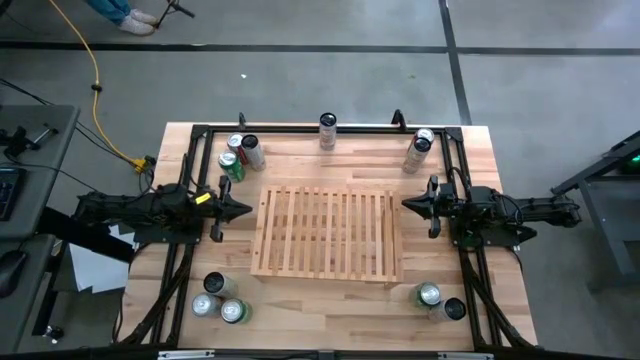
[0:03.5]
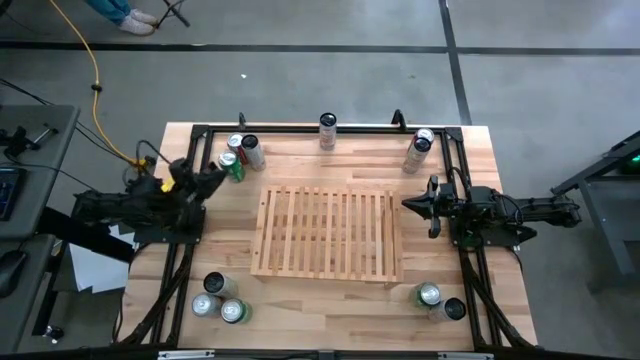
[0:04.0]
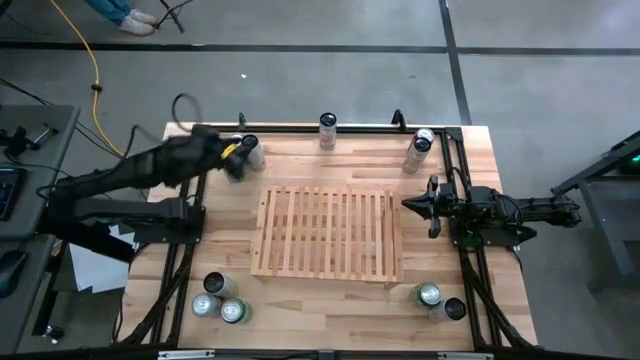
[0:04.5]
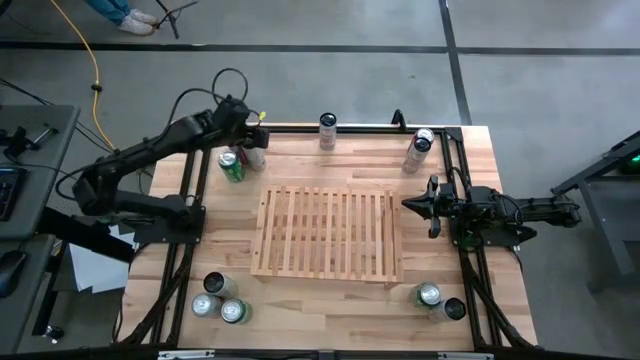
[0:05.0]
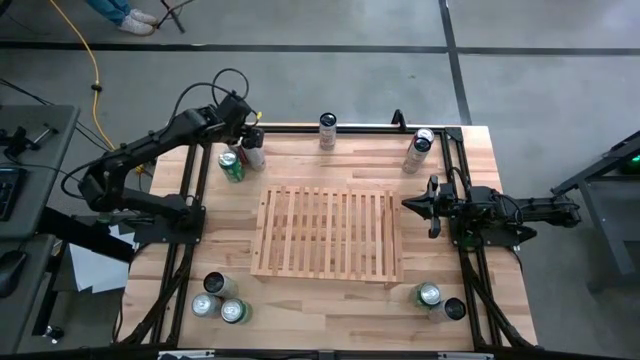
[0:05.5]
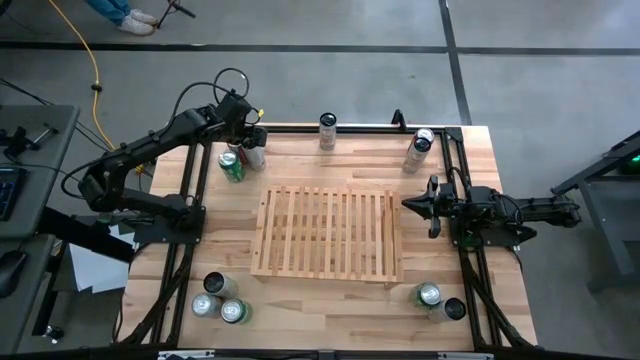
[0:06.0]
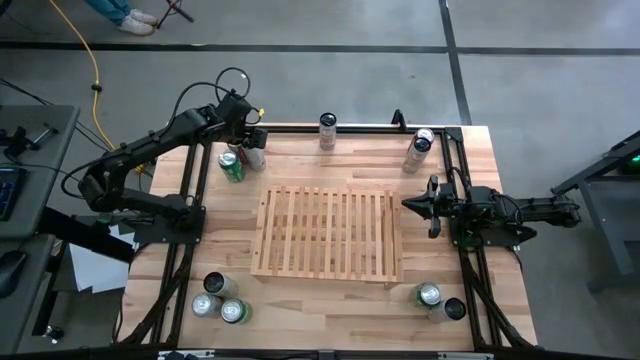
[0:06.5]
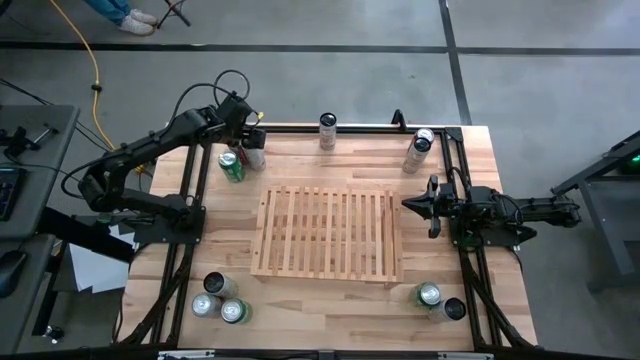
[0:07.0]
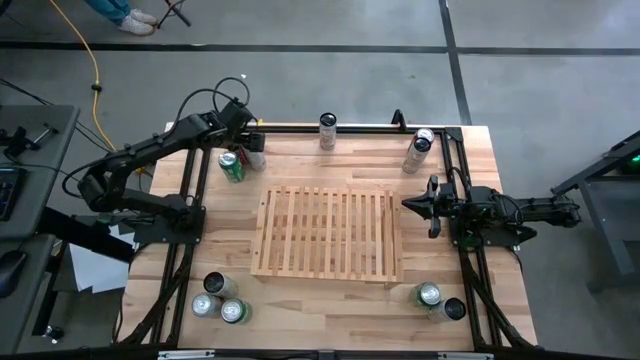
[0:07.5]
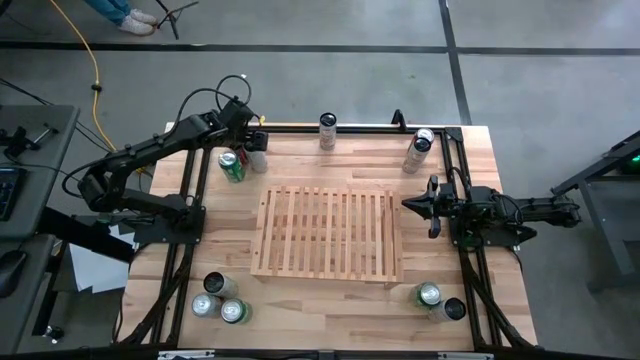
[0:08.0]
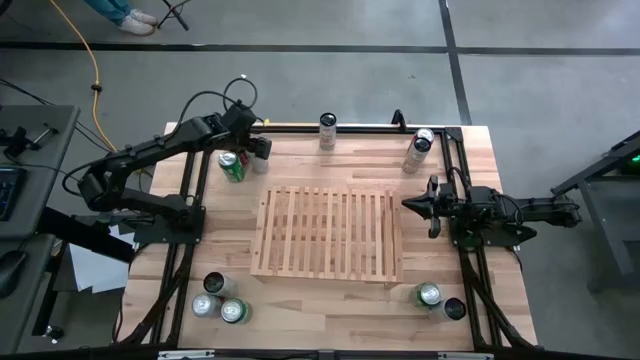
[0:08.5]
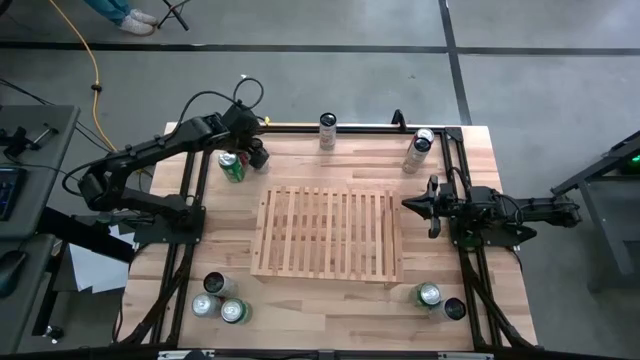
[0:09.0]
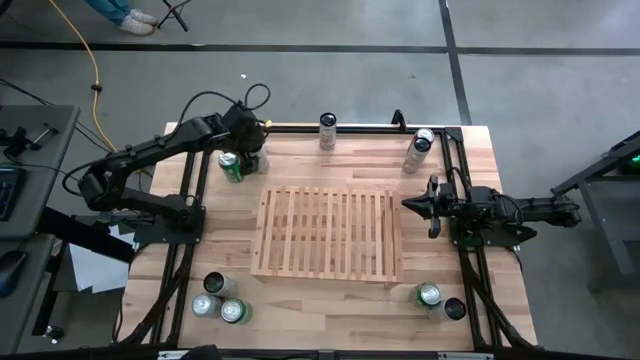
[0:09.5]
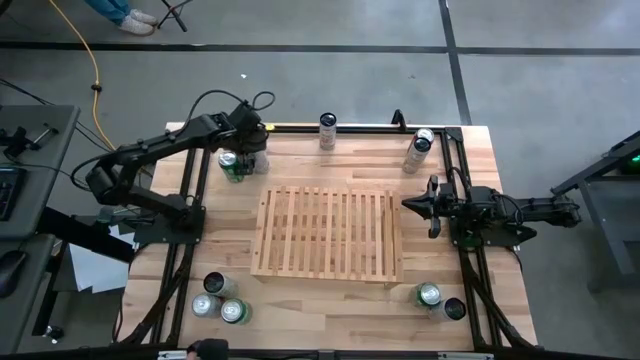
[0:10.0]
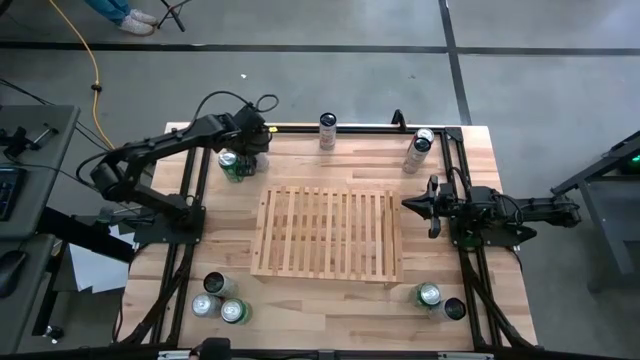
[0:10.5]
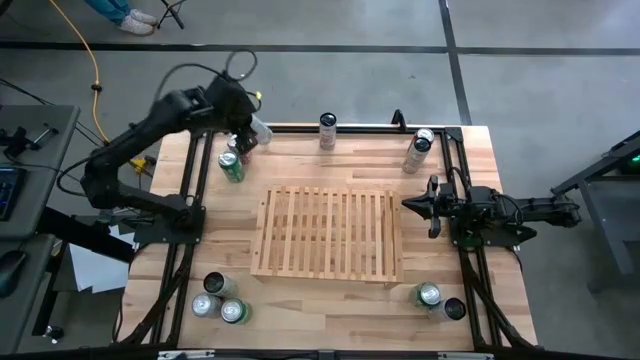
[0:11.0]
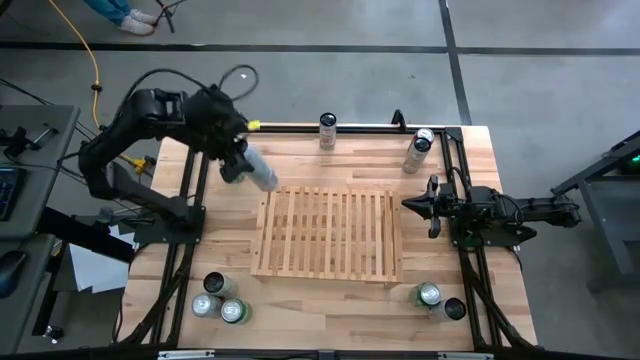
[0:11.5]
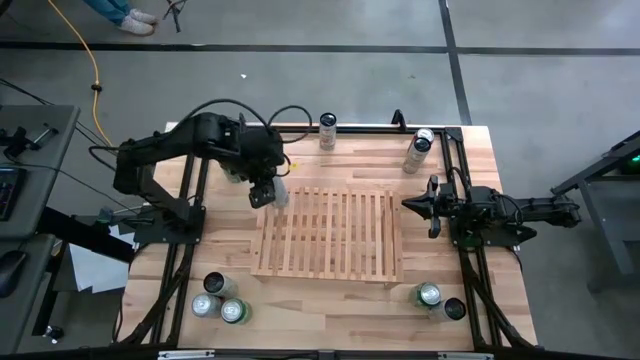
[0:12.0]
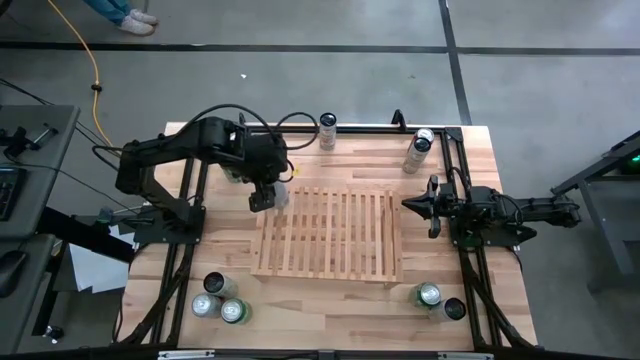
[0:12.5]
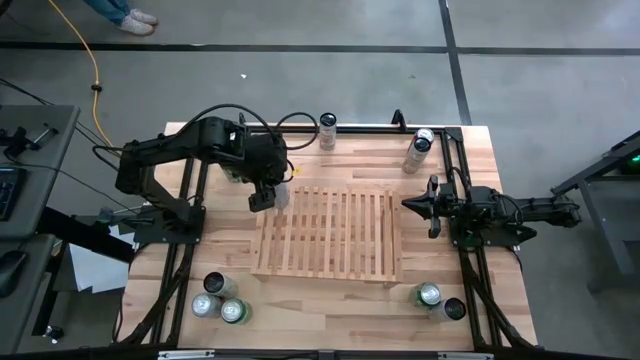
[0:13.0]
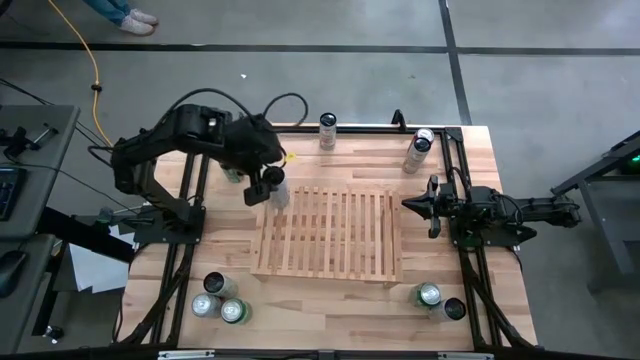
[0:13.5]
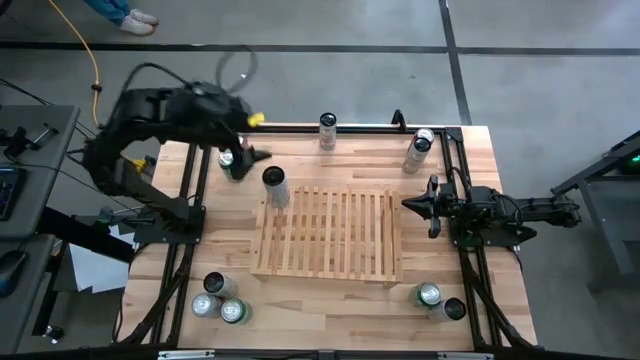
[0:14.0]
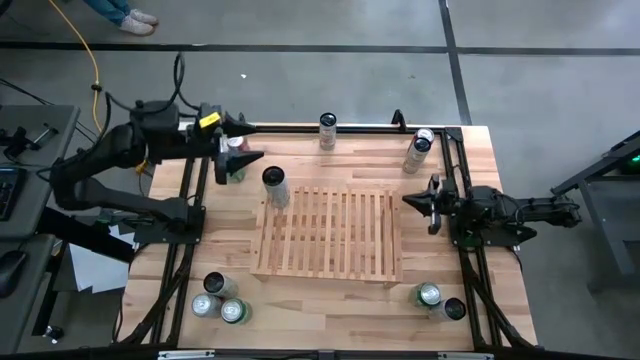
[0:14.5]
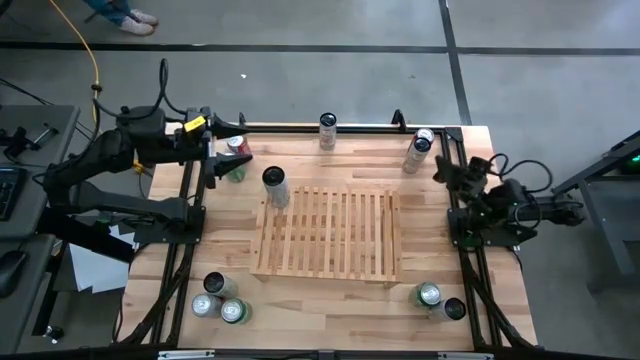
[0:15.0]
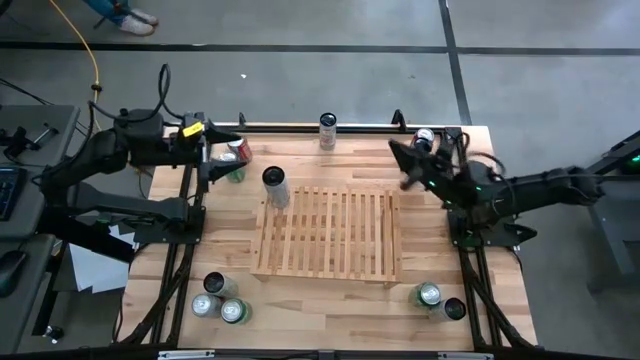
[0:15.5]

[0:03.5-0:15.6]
Task: Place canned beverage on shelf
Put the top left white pink soda can on the shelf

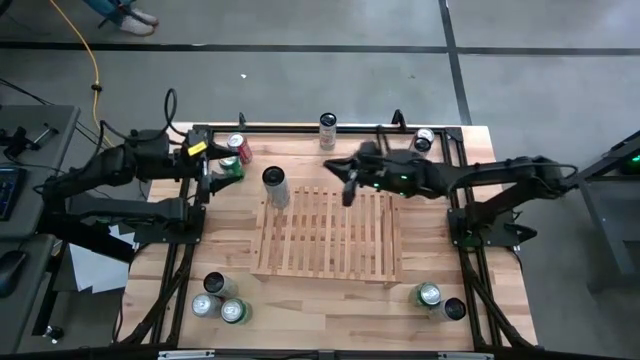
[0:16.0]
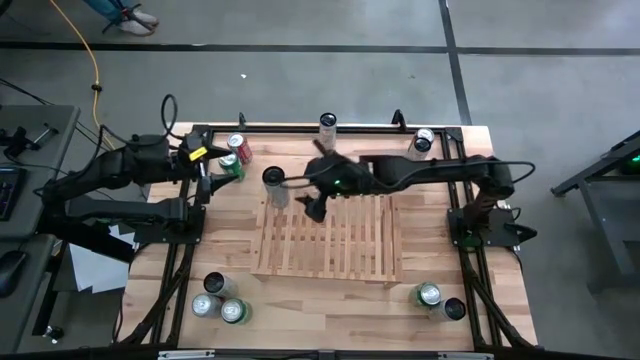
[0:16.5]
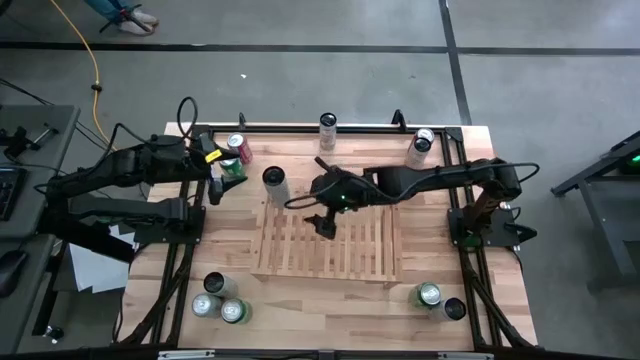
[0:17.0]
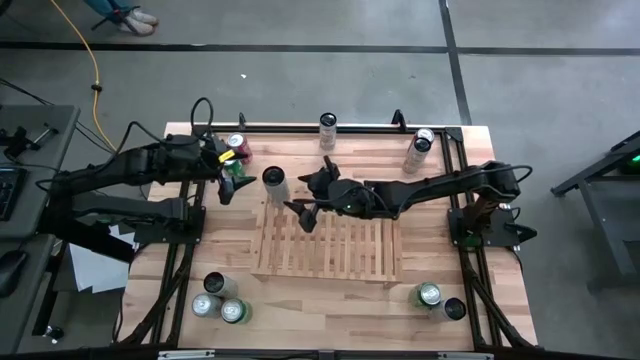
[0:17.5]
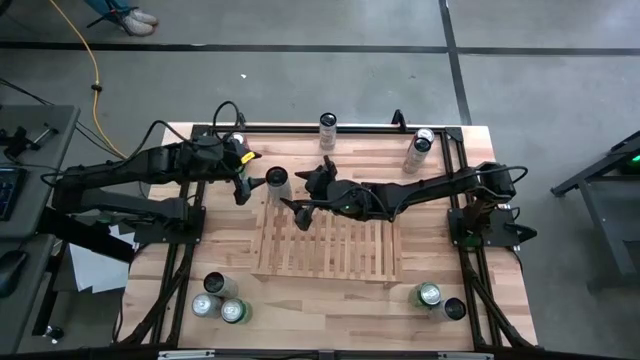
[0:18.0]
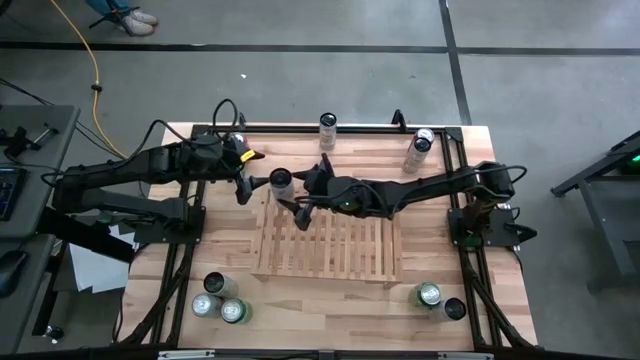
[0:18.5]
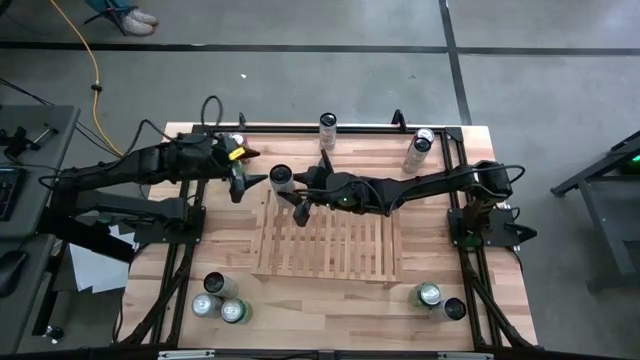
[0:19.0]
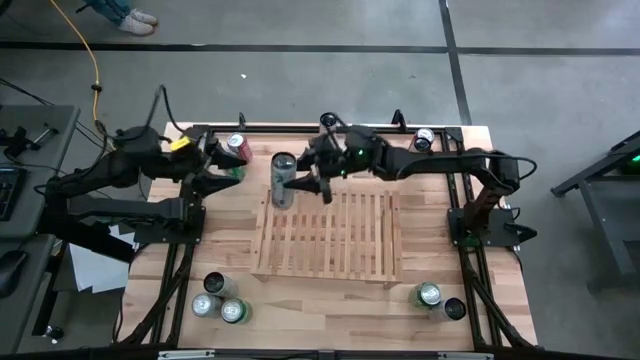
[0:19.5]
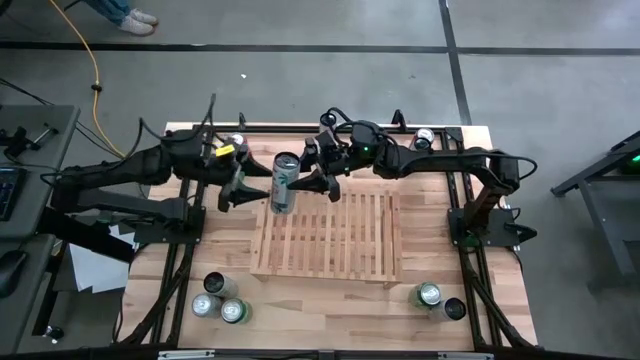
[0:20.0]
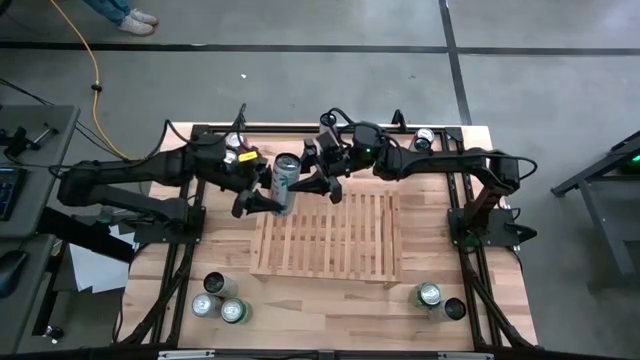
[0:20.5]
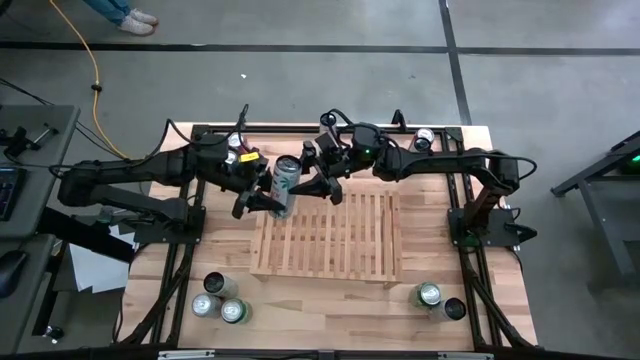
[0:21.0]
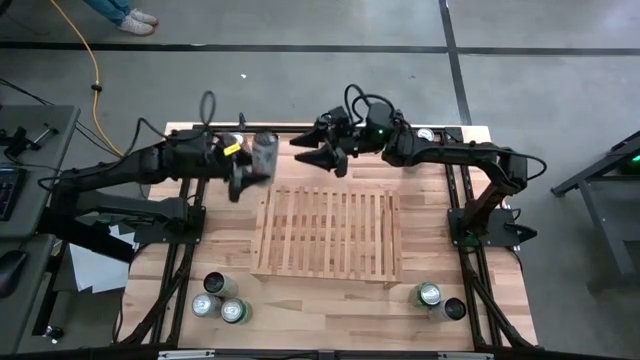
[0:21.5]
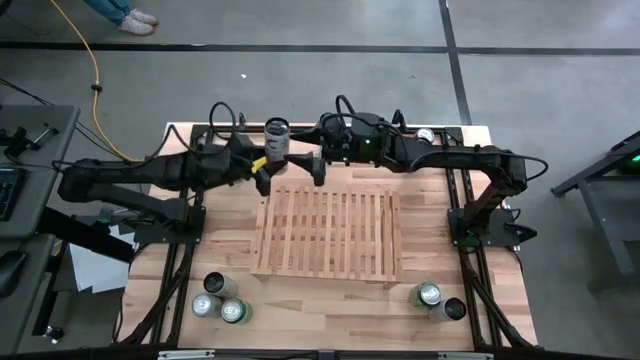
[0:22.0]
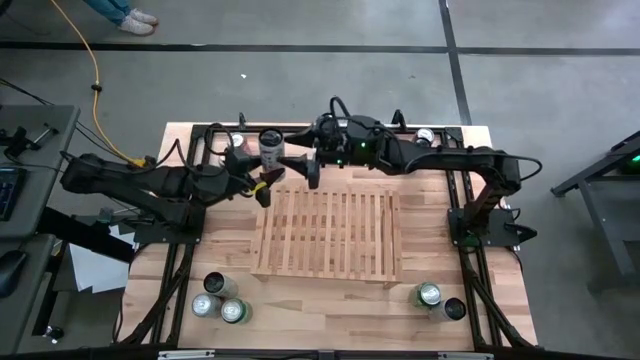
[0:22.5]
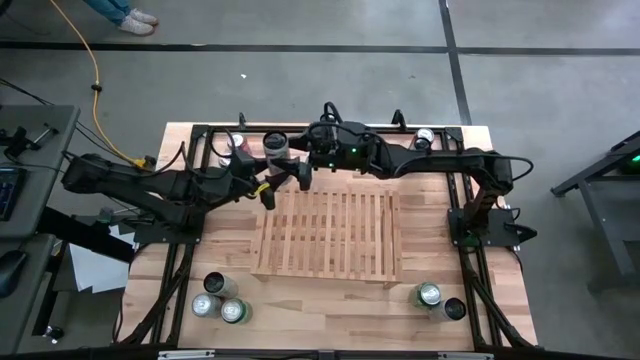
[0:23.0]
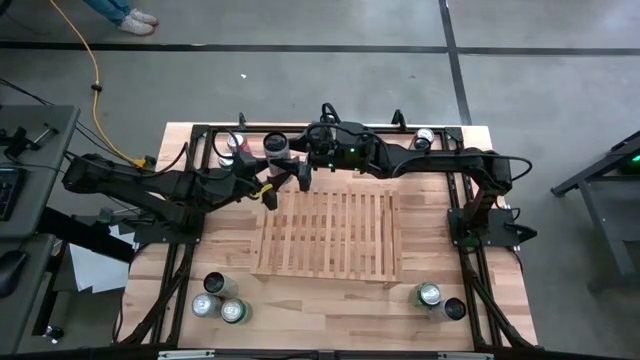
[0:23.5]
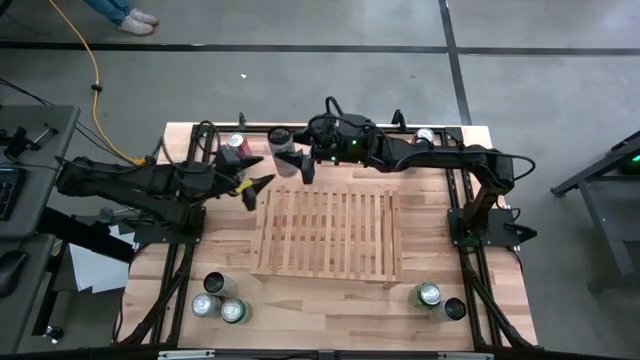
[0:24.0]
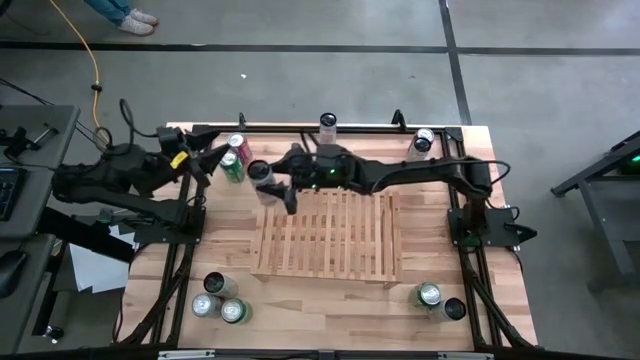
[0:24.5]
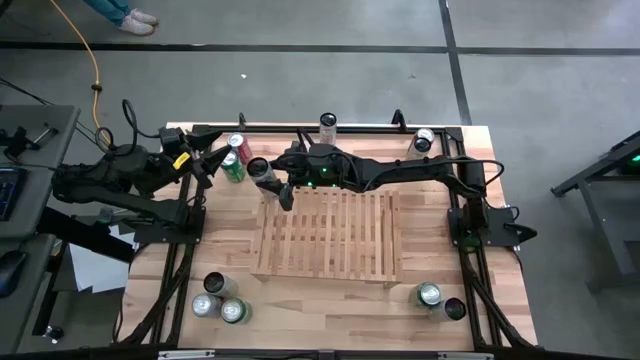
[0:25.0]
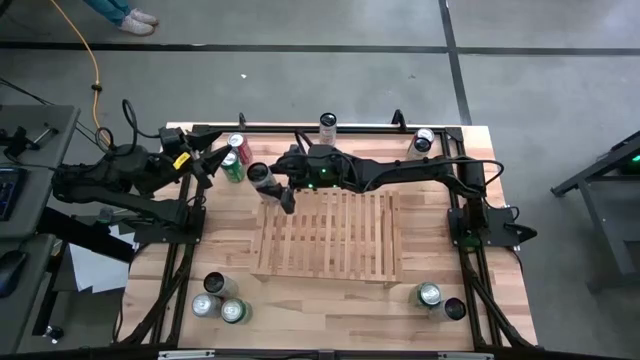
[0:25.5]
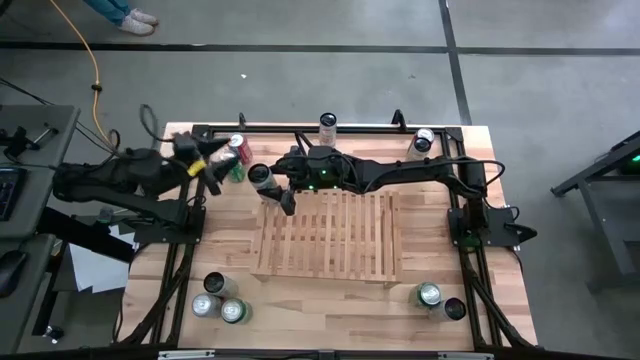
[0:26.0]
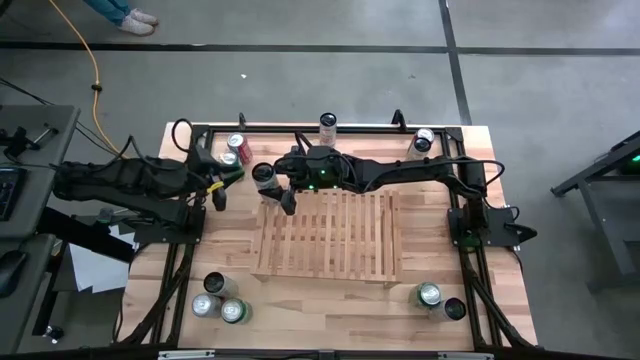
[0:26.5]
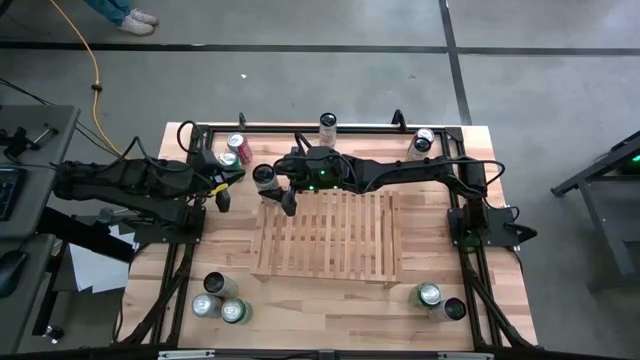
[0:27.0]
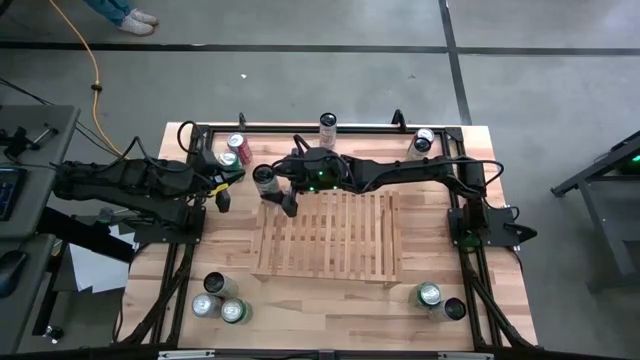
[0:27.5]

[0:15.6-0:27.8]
Put the top left white pink soda can on the shelf
